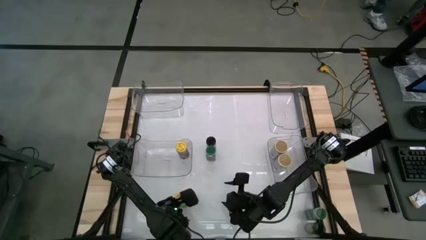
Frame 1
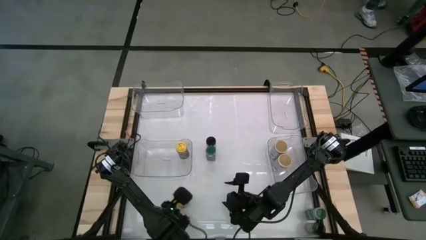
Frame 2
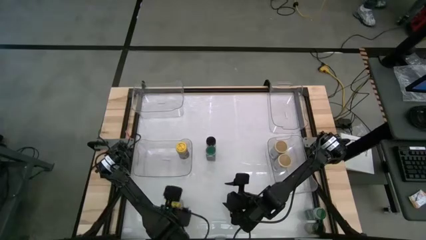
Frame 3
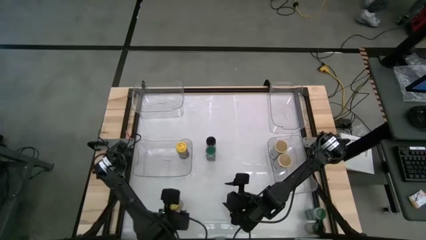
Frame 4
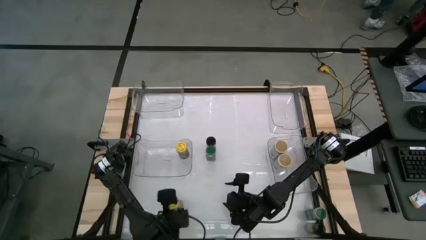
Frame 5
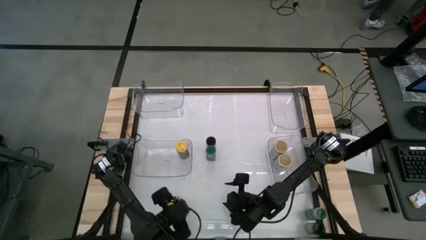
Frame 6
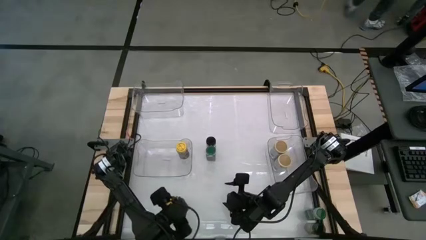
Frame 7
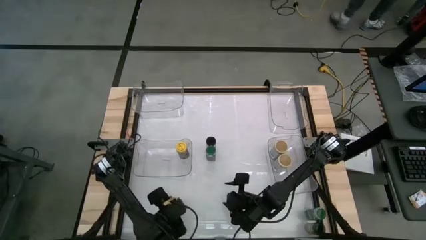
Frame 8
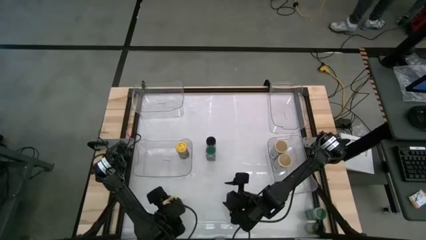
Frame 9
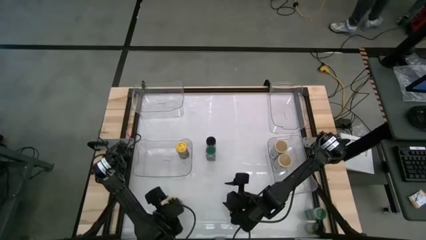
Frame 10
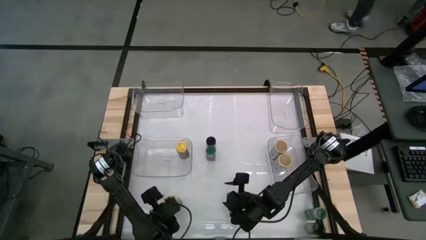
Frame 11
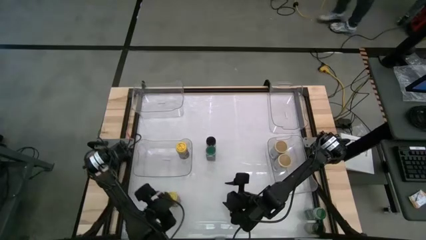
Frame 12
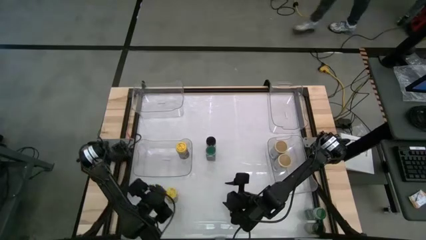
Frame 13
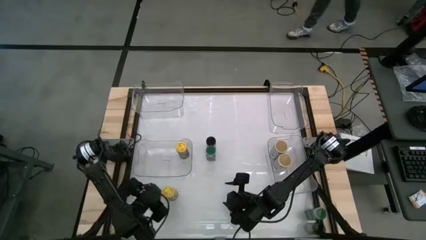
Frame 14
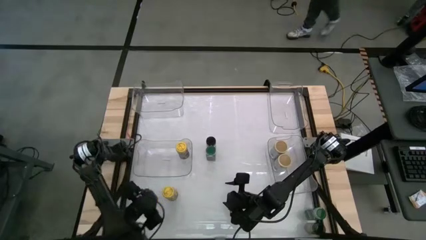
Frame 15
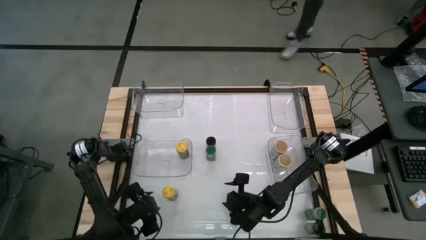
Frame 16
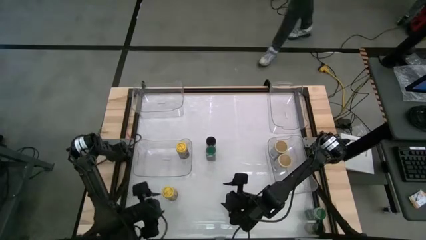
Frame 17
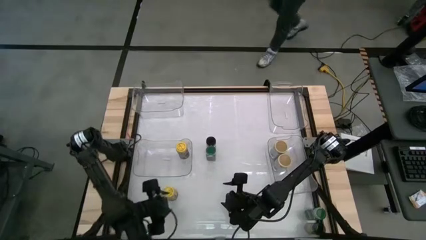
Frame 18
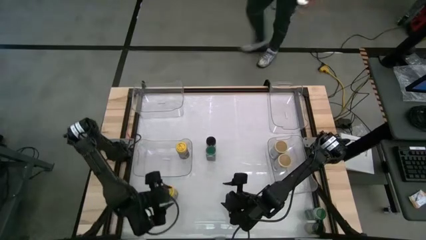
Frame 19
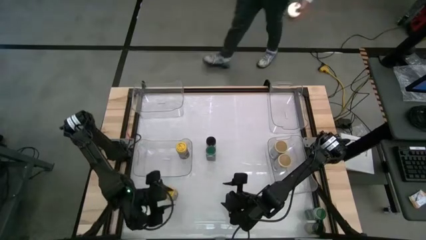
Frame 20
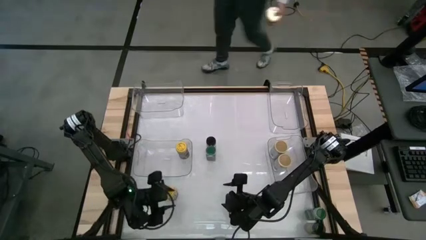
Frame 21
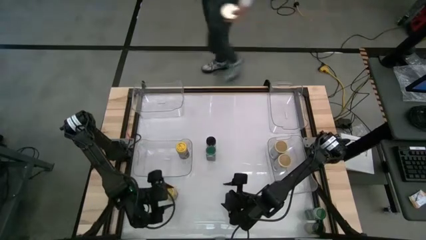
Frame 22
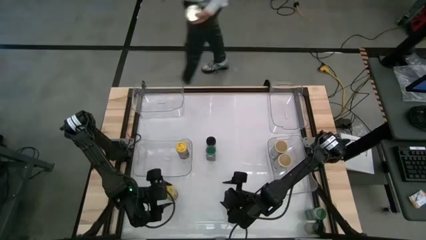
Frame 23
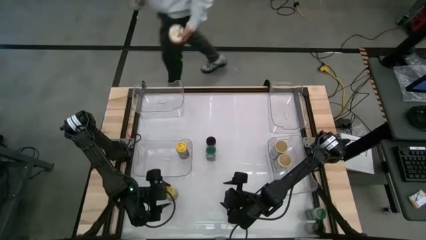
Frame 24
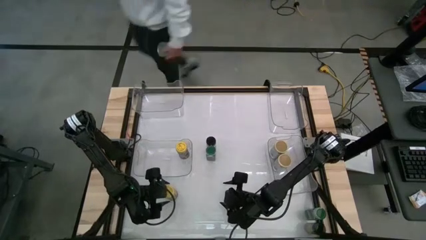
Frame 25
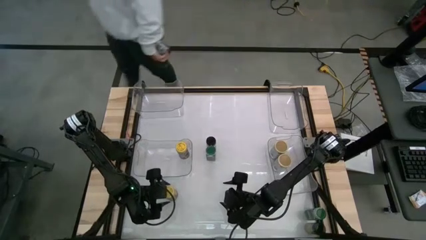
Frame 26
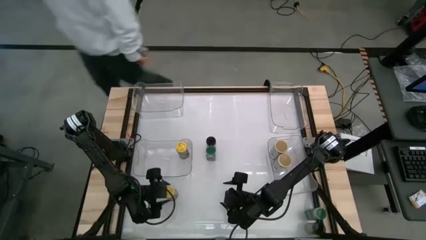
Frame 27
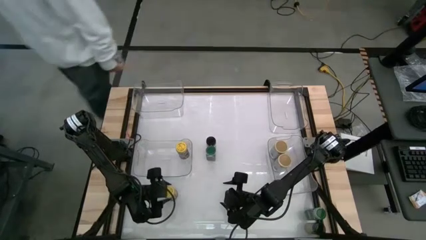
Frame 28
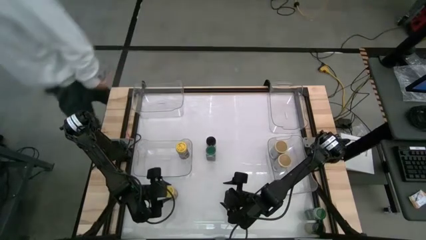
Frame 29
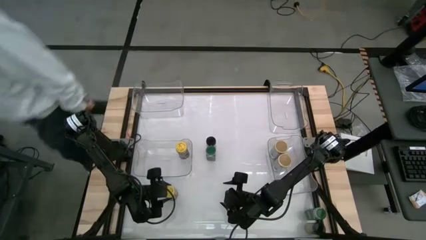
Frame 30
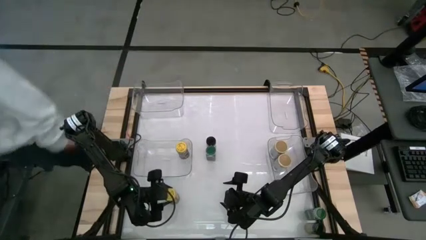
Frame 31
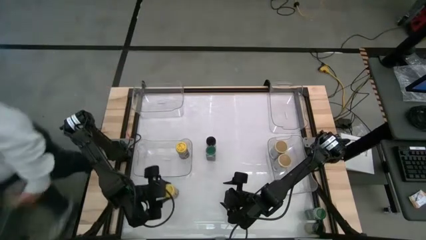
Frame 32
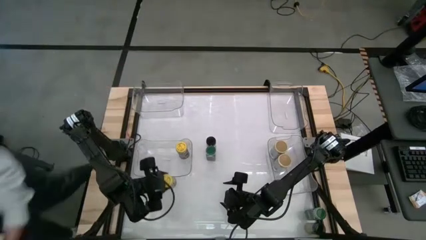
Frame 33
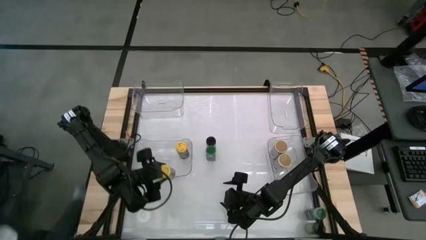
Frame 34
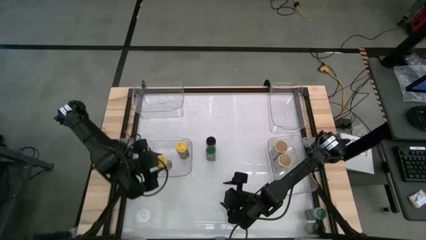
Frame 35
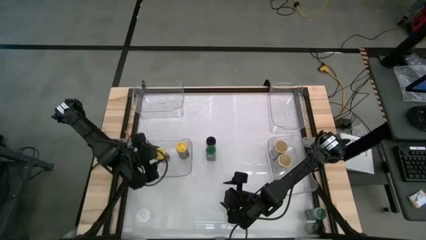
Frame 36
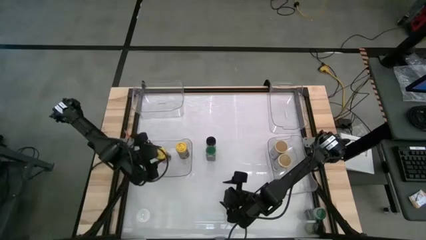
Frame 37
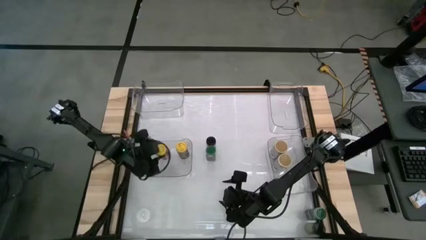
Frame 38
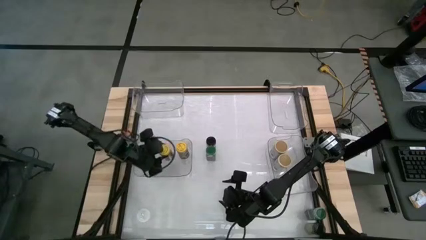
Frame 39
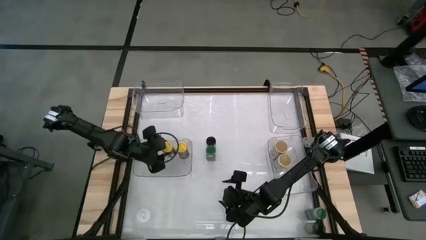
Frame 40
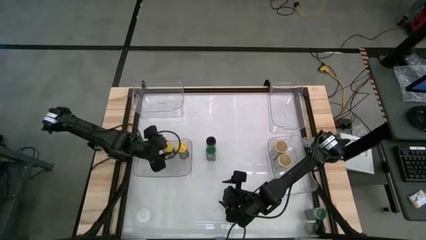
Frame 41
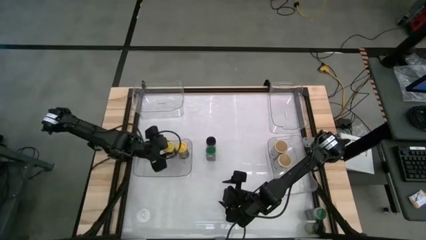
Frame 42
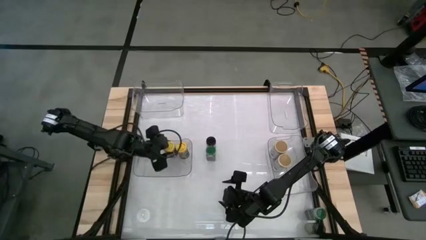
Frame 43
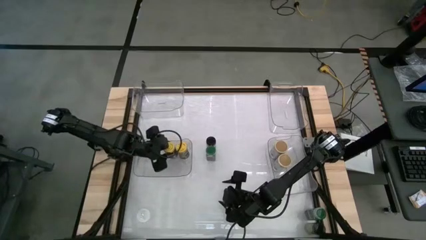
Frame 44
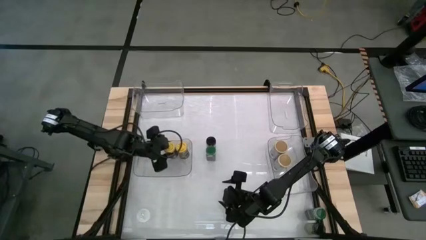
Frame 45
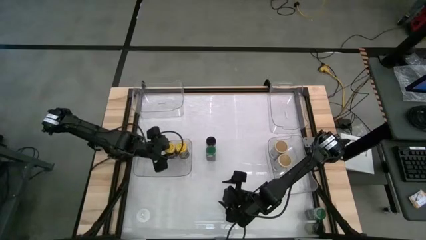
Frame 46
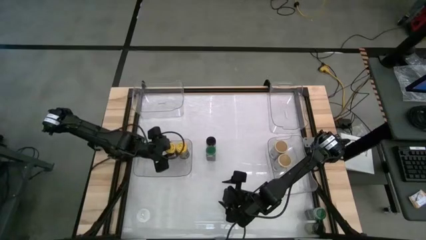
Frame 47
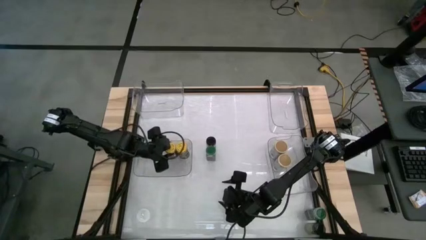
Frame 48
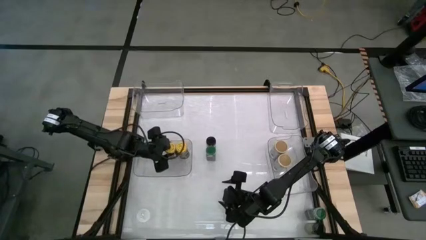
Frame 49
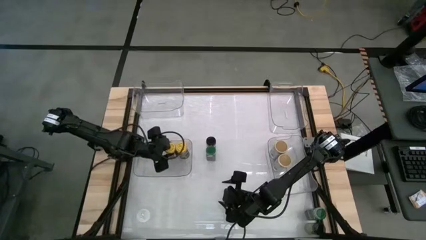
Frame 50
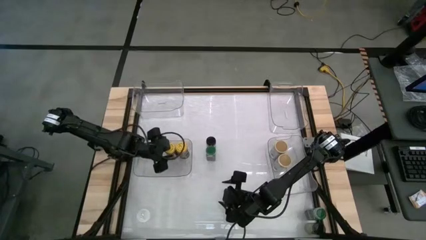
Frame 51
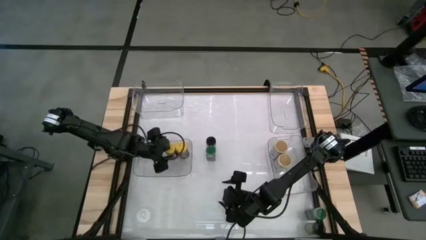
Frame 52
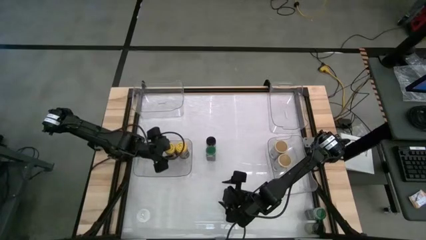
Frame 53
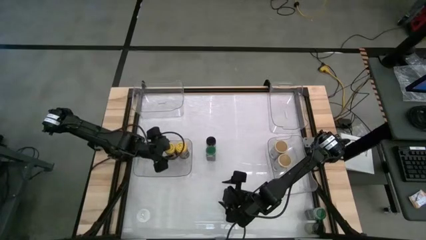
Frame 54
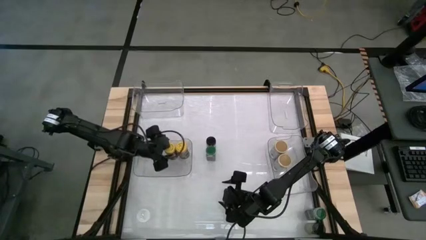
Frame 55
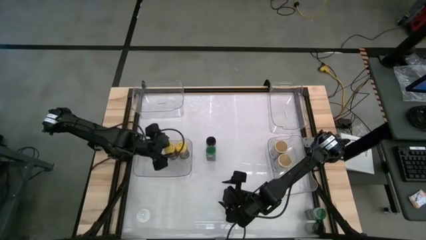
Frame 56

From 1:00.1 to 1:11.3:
Task: Sort spices by type
Put the yellow spice bottle into the bottom left transparent bin

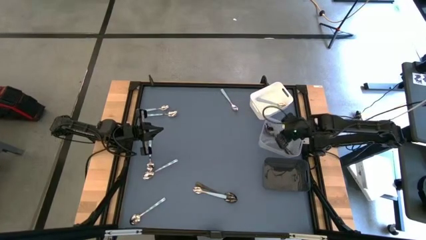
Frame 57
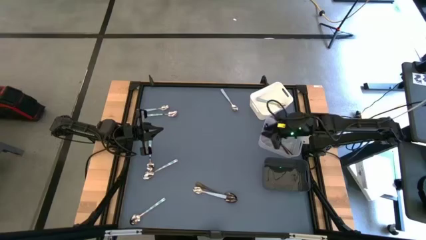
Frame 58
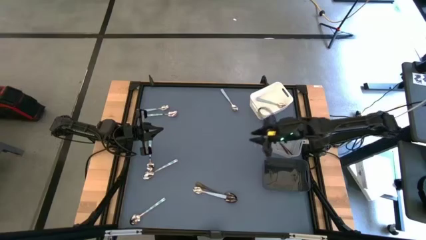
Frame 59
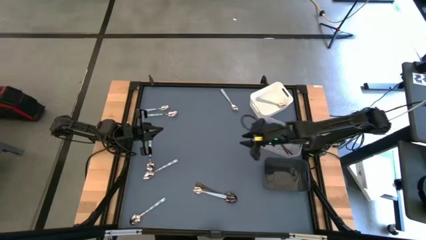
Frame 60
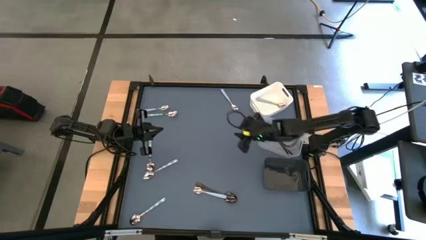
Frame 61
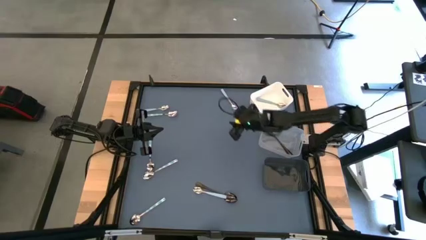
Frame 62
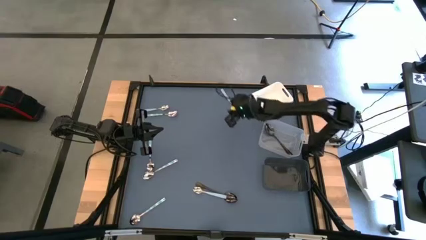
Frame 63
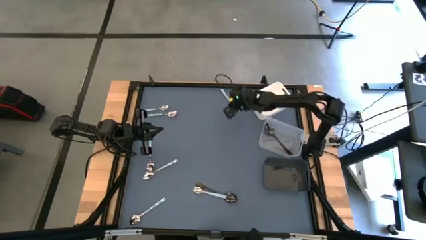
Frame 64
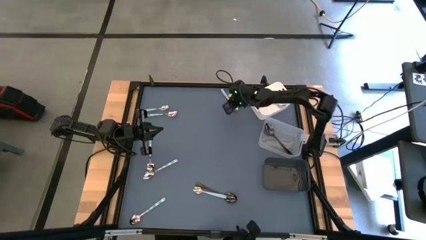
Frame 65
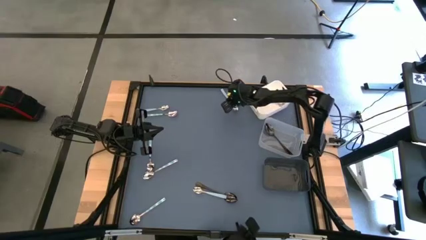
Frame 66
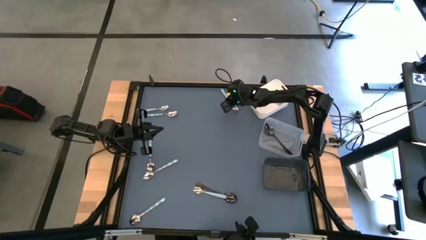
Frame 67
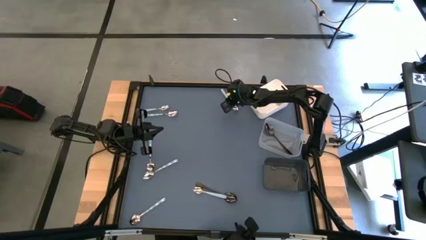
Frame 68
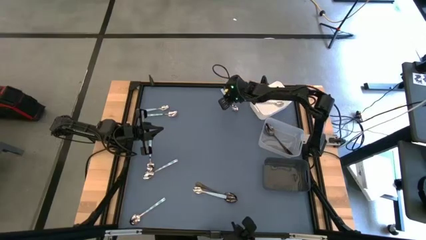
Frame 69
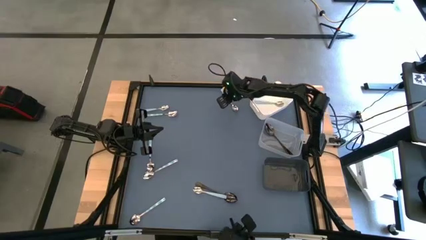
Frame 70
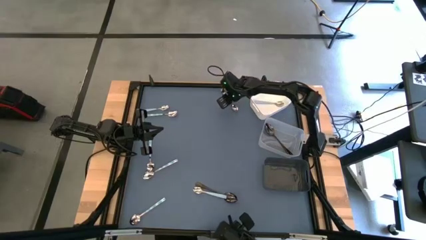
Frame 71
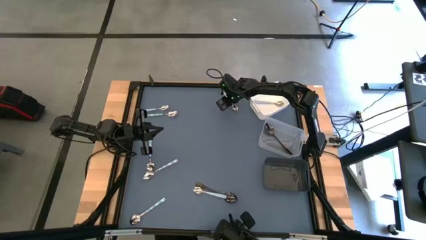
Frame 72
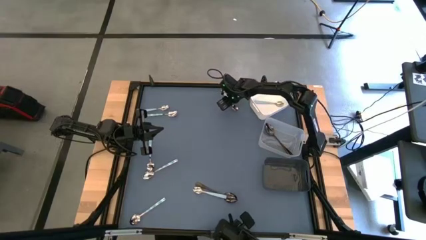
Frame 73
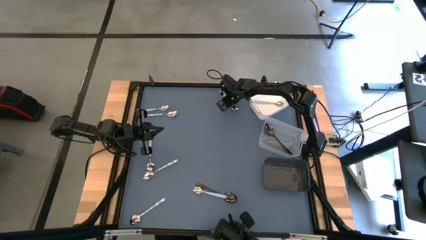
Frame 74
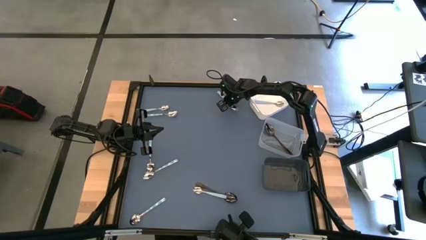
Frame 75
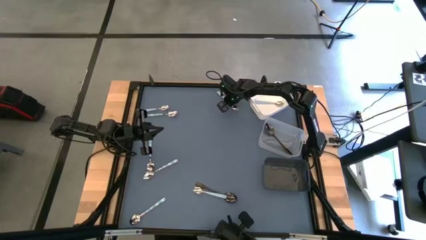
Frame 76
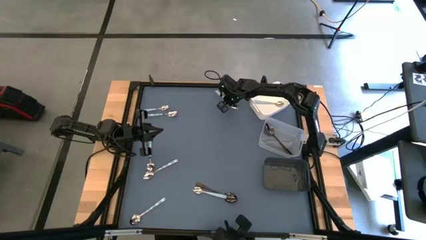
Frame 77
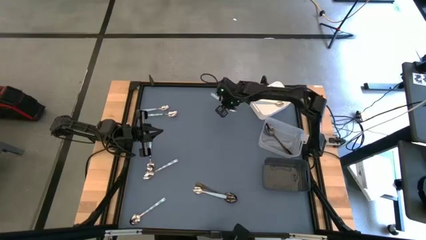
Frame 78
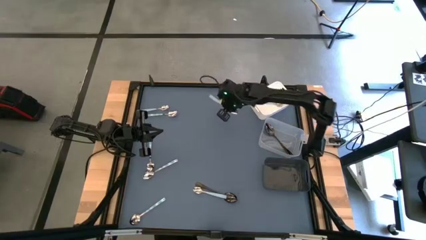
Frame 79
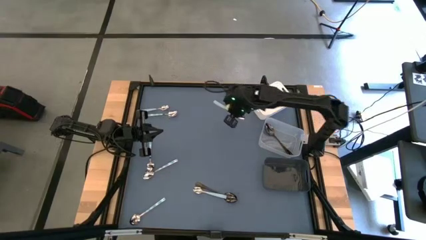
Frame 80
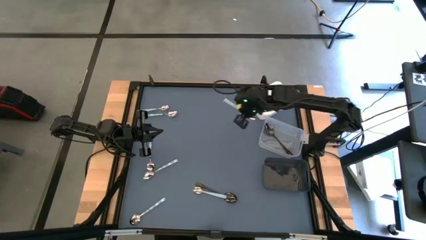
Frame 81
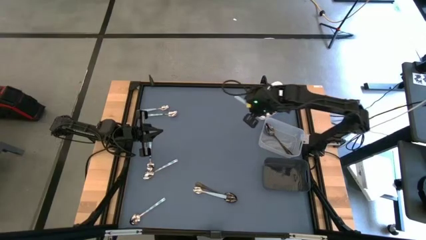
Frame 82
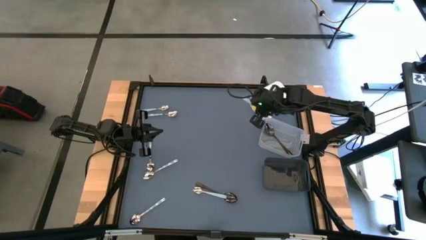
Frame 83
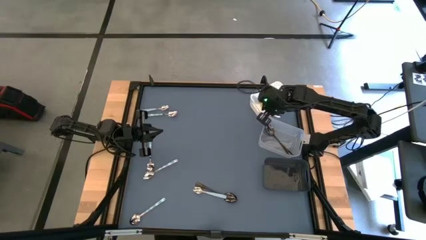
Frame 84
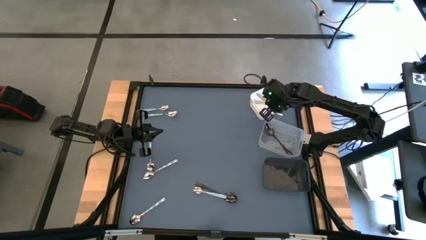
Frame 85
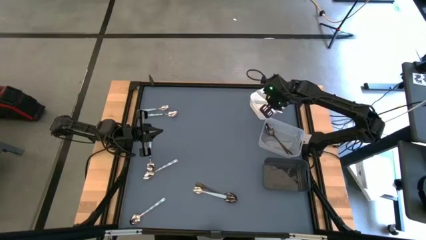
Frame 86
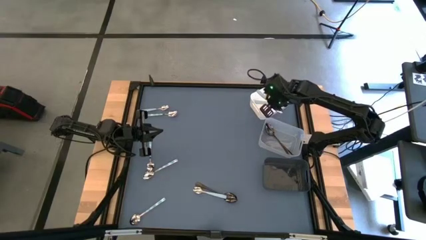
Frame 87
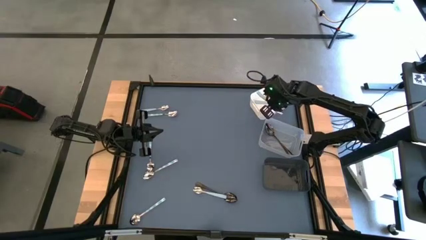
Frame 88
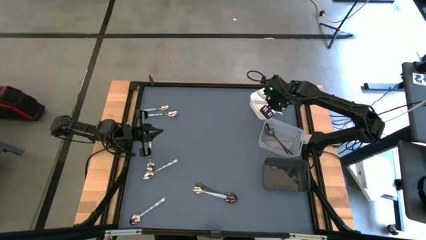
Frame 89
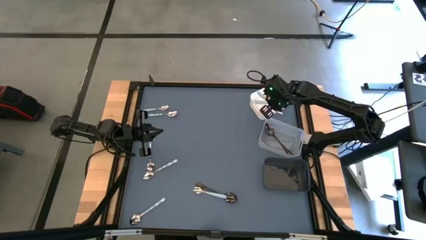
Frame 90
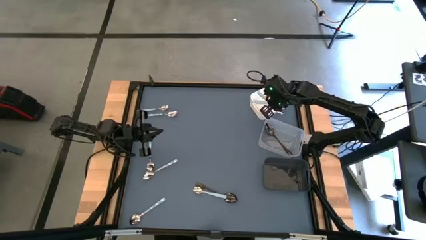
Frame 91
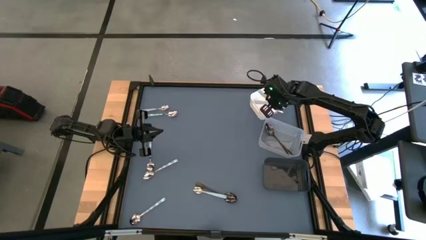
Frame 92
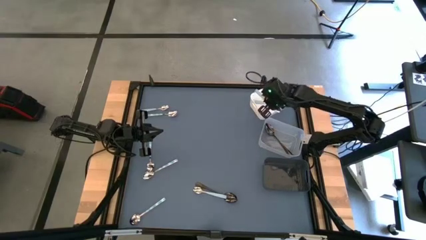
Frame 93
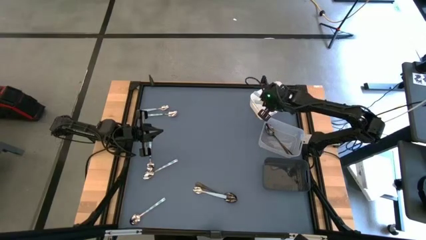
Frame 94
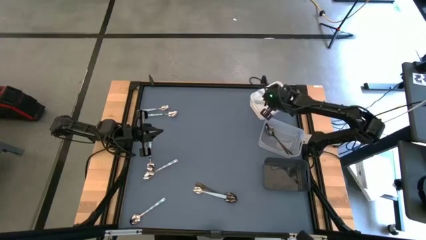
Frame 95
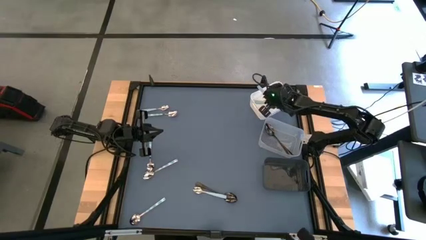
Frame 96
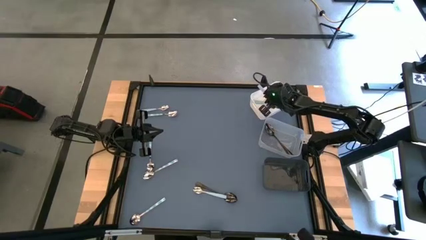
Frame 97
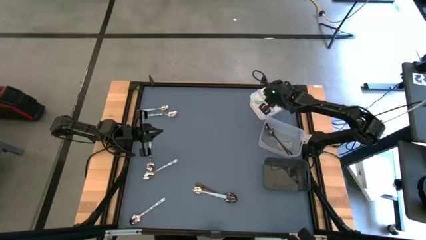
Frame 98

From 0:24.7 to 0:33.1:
Task: Sort silverware by color (type)
Put the top center light blue spoon into the white bin
